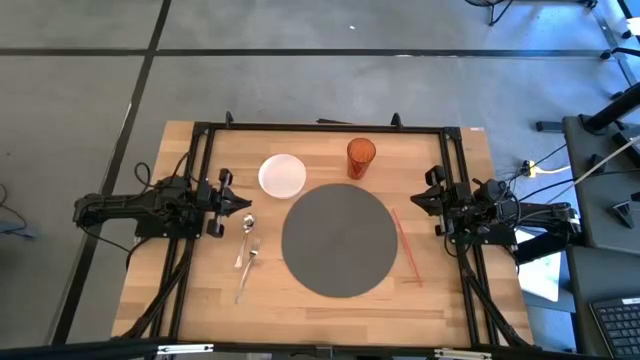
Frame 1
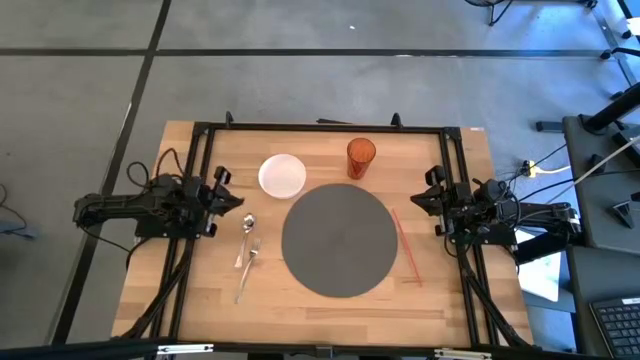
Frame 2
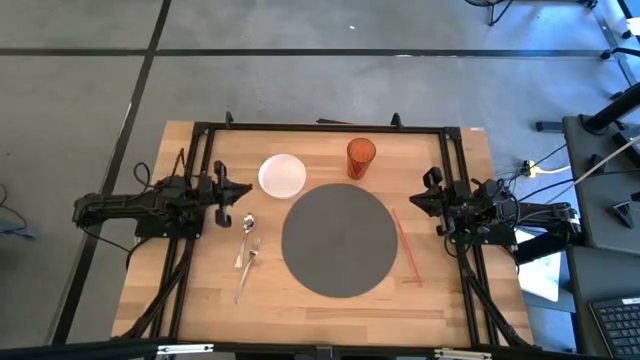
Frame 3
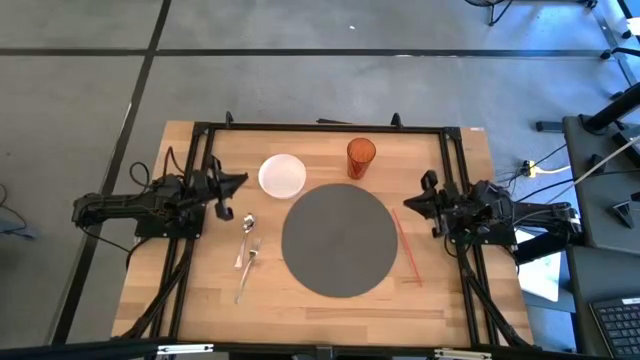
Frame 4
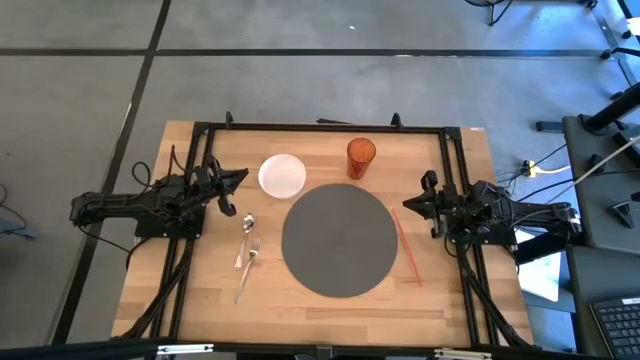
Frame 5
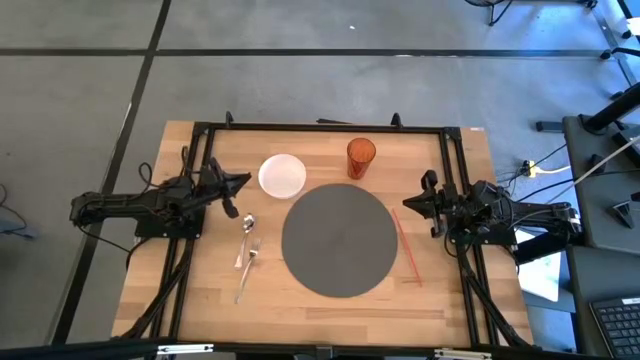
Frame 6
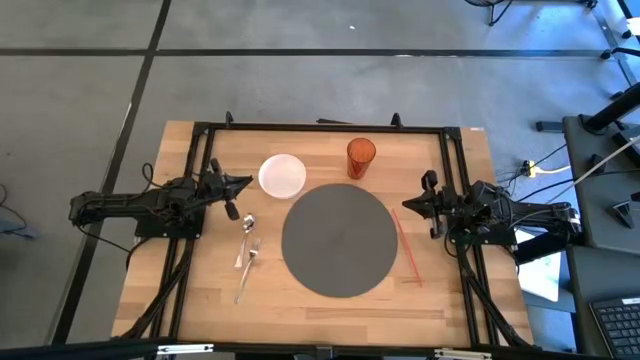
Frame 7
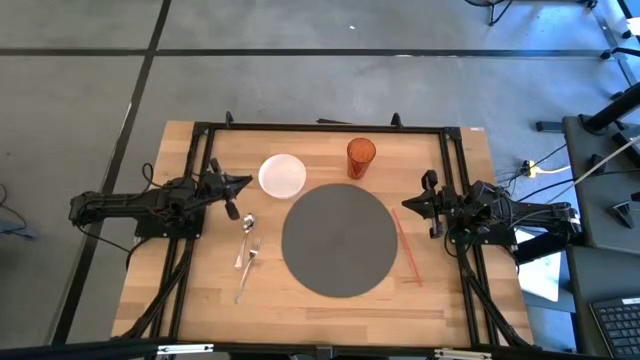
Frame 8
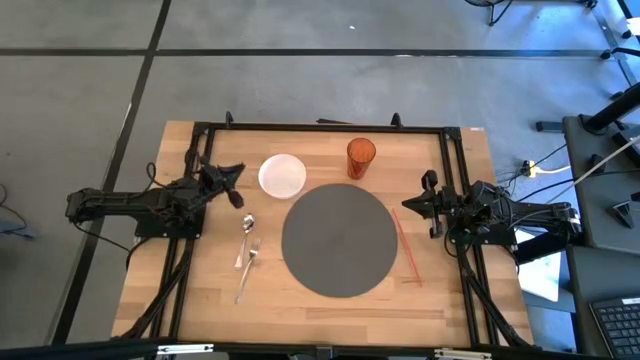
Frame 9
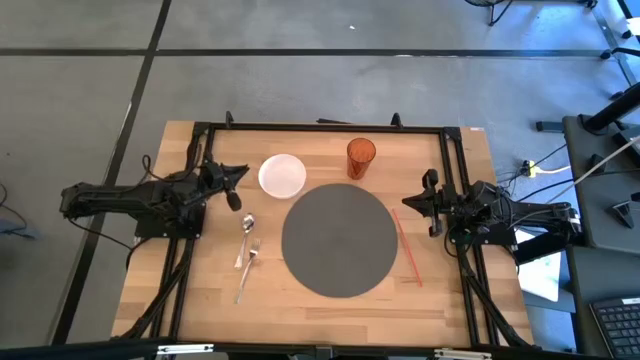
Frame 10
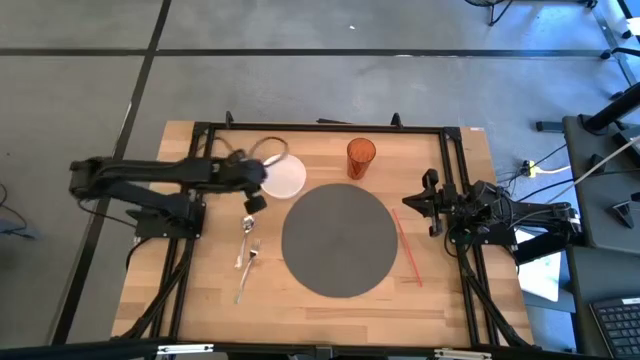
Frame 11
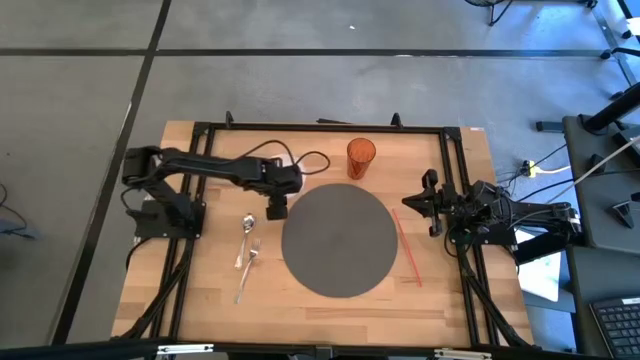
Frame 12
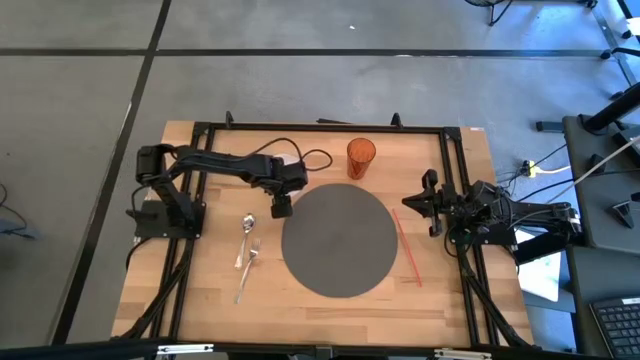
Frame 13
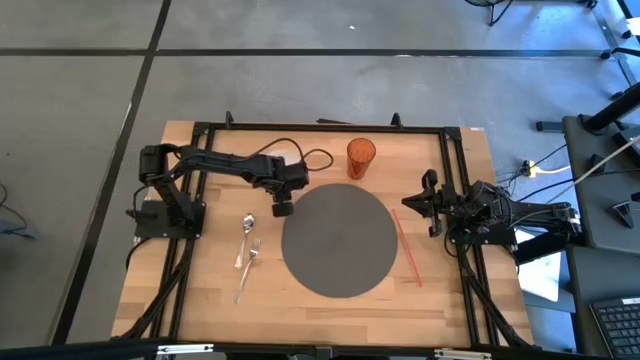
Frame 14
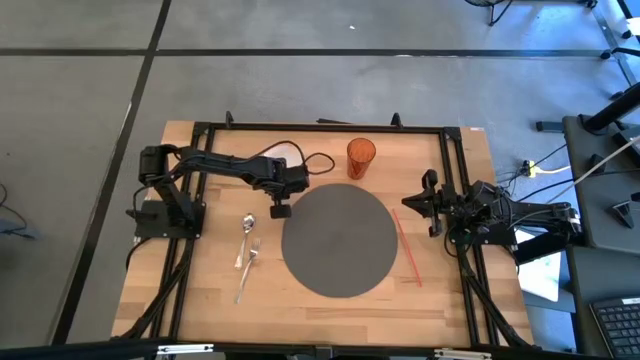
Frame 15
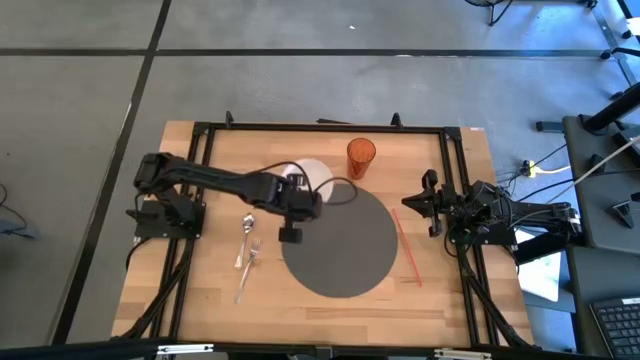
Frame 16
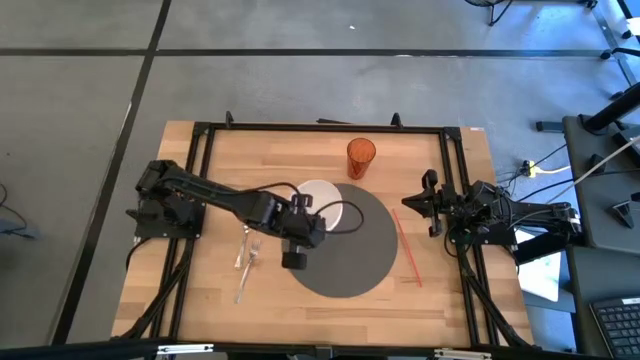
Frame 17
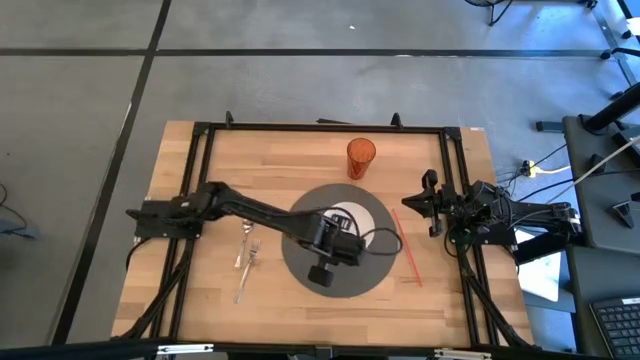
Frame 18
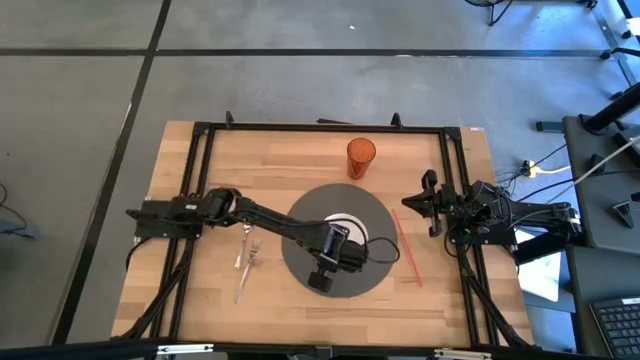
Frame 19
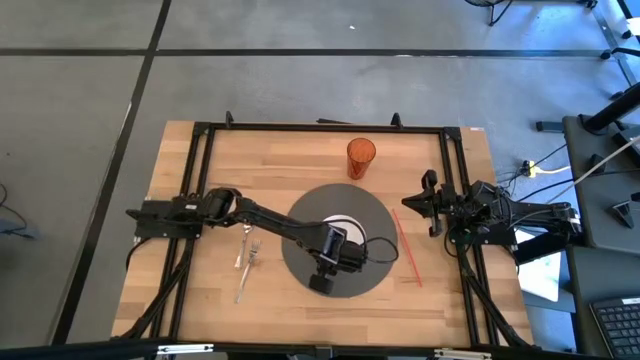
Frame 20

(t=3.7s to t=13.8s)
Task: Pick & Place Utensil
Put the white bowl on the gray table mat

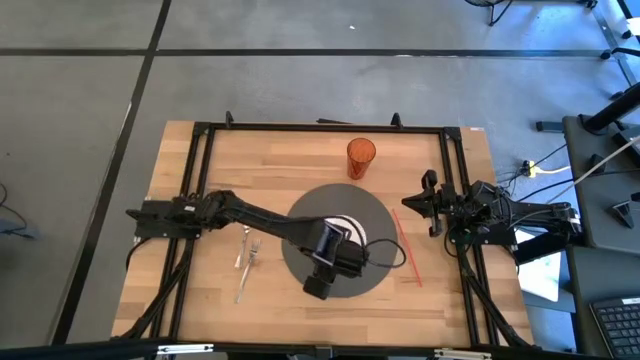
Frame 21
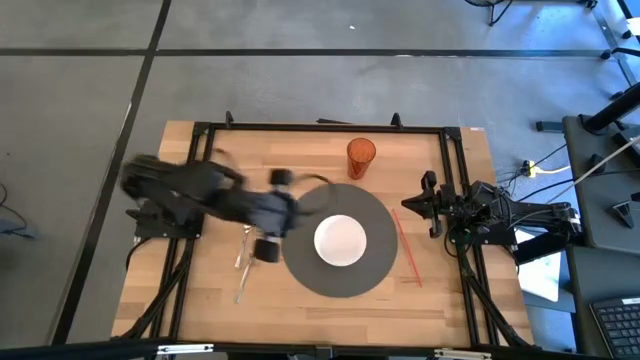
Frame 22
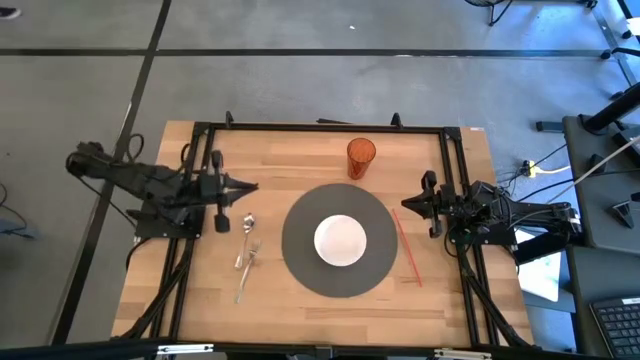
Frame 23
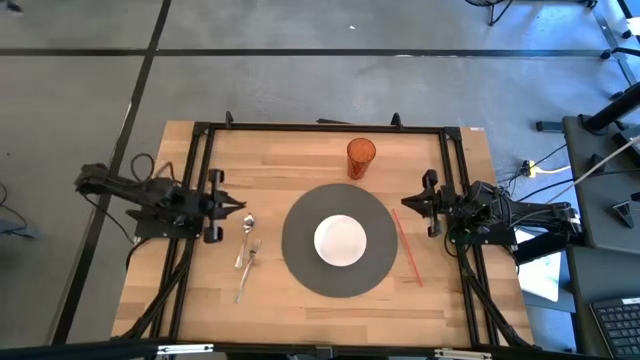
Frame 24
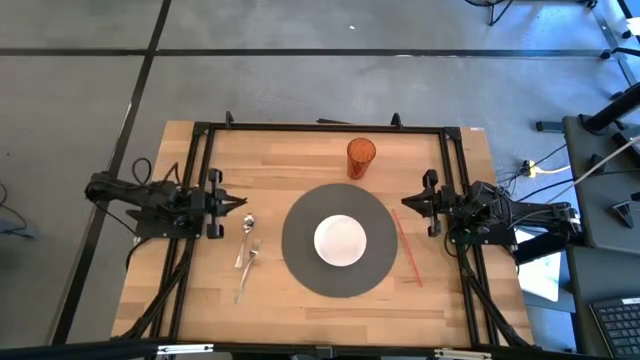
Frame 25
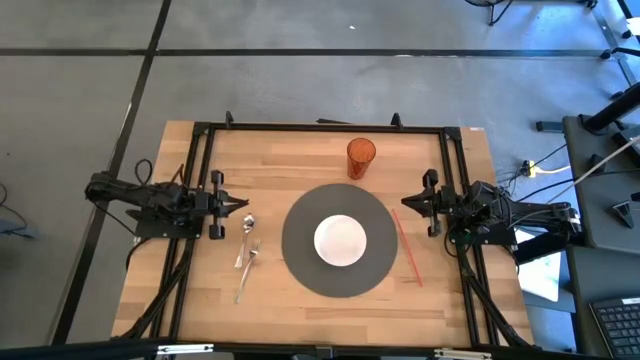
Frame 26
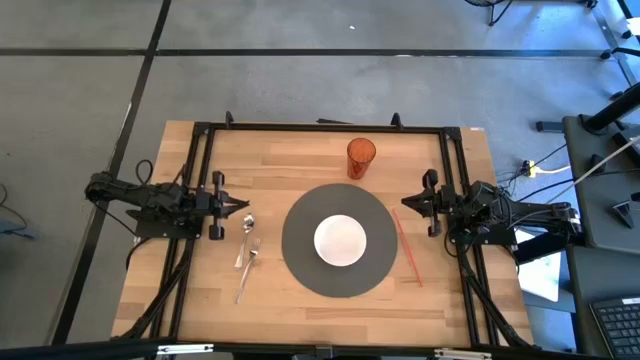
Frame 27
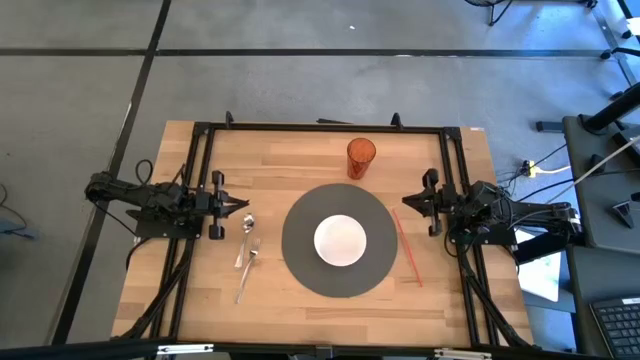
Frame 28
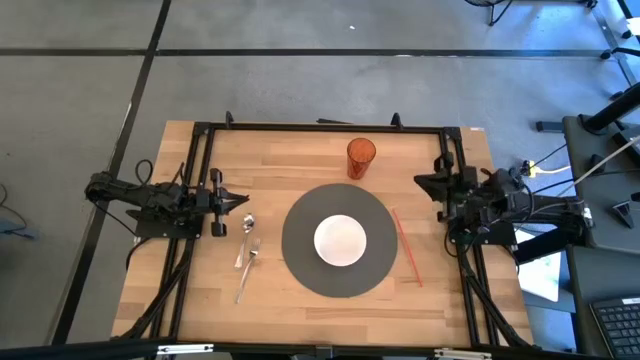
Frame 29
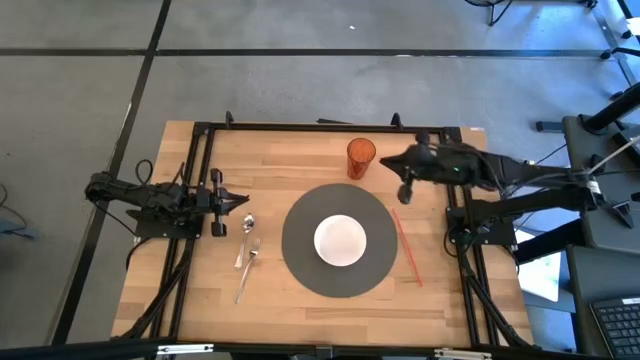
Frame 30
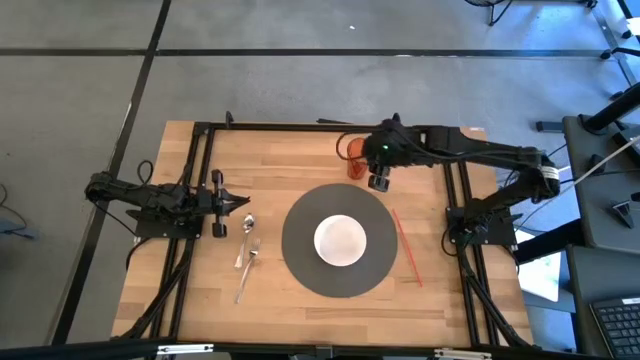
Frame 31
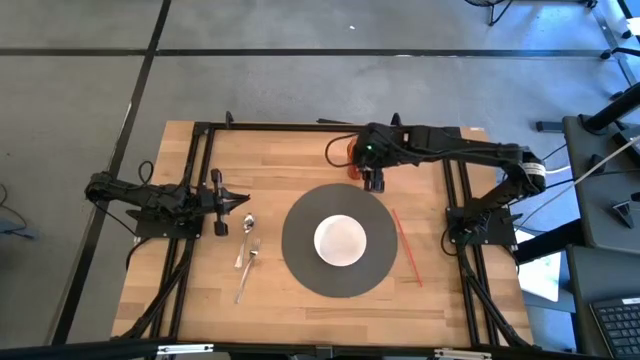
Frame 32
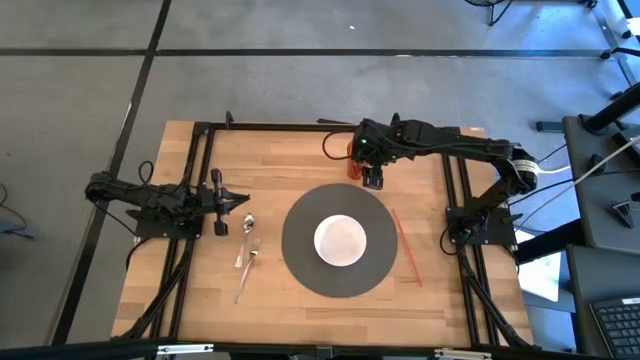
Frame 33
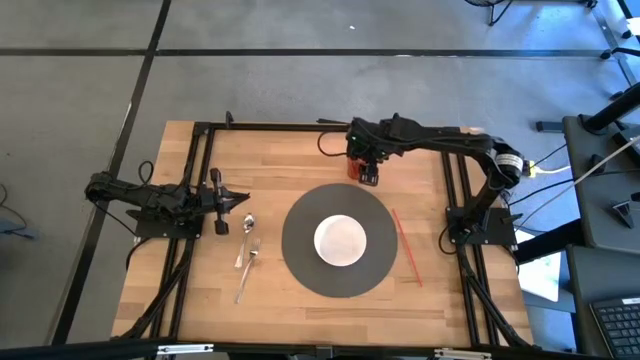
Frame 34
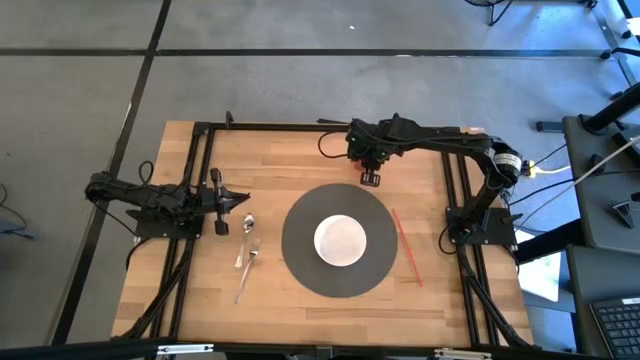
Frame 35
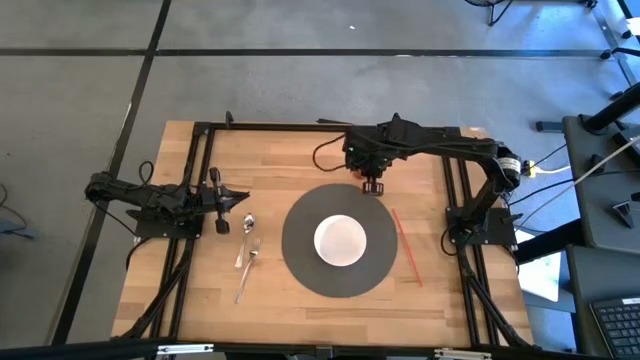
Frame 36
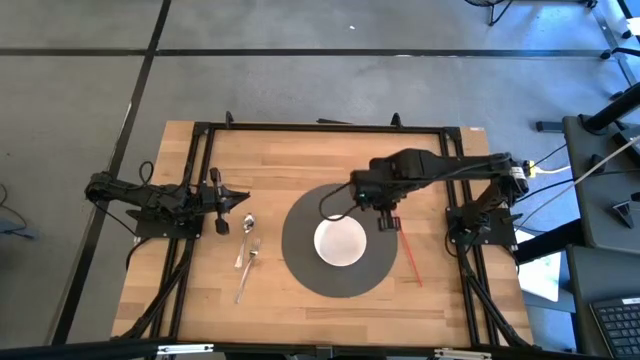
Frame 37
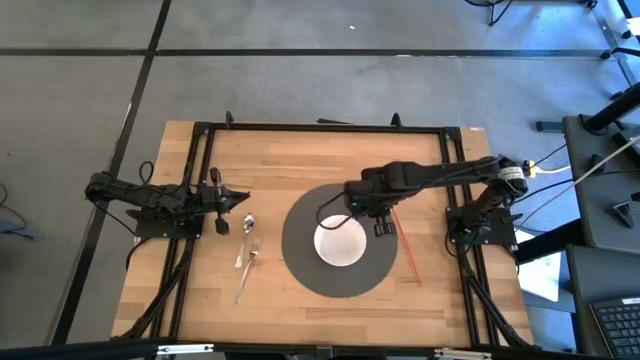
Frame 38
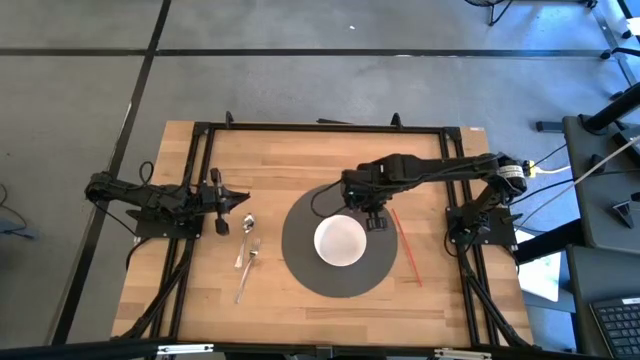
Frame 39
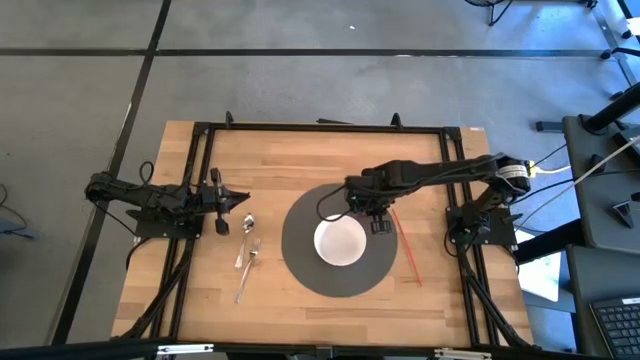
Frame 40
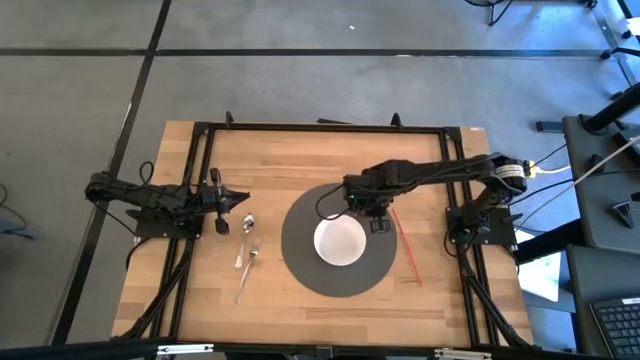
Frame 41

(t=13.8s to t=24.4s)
Put the orange cup on the gray table mat to the top right of the white bowl
